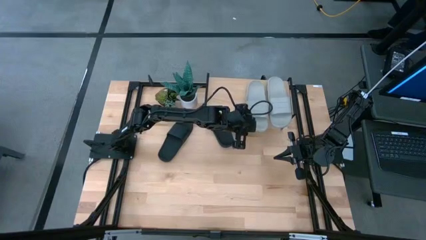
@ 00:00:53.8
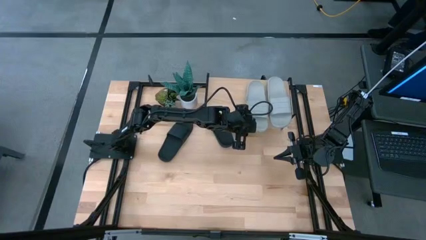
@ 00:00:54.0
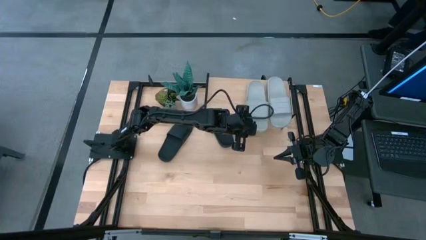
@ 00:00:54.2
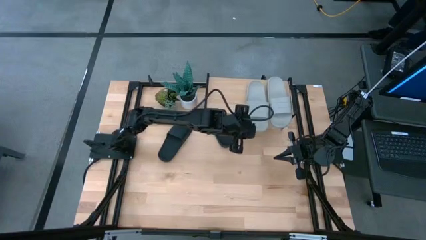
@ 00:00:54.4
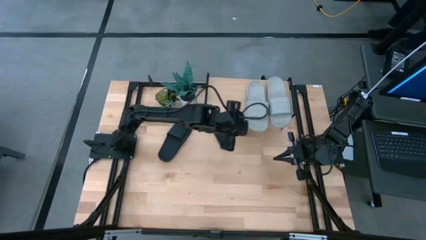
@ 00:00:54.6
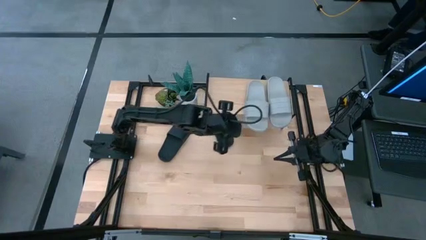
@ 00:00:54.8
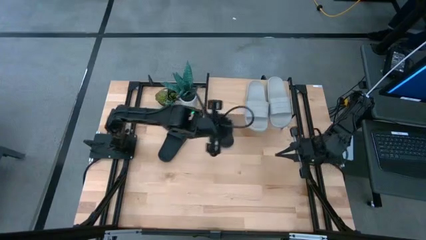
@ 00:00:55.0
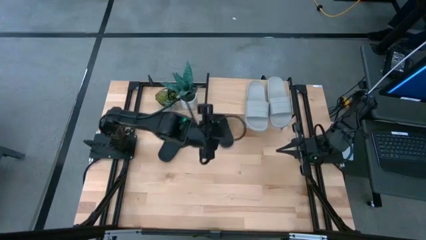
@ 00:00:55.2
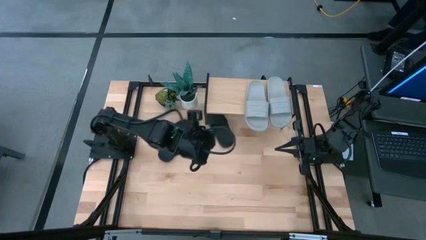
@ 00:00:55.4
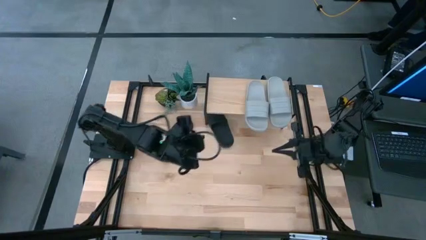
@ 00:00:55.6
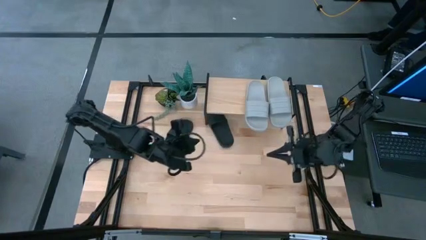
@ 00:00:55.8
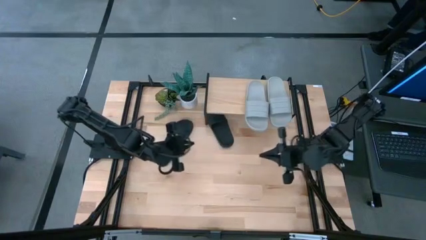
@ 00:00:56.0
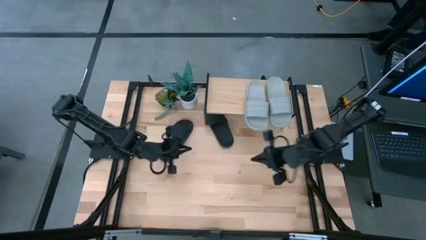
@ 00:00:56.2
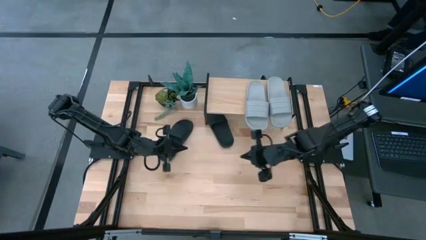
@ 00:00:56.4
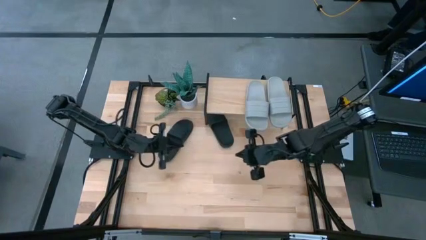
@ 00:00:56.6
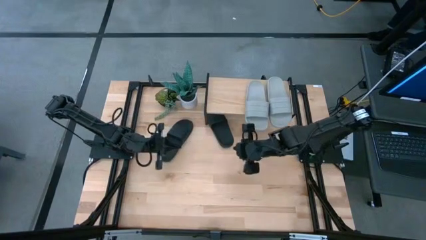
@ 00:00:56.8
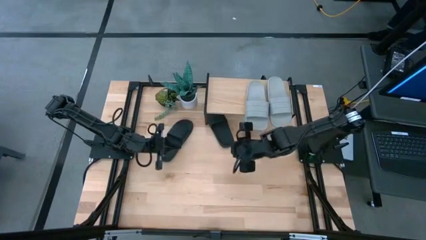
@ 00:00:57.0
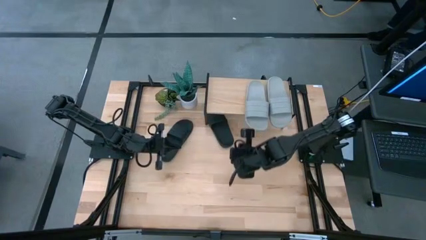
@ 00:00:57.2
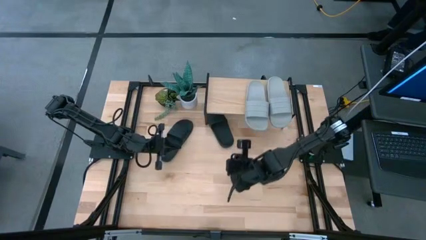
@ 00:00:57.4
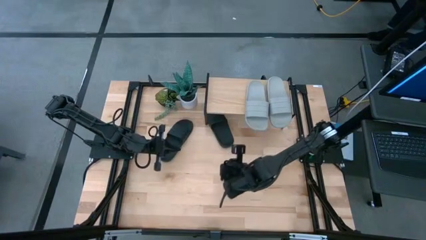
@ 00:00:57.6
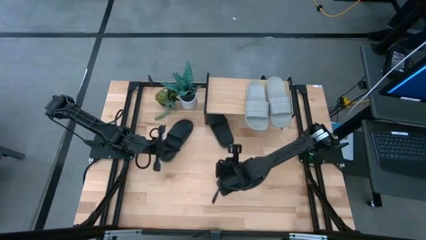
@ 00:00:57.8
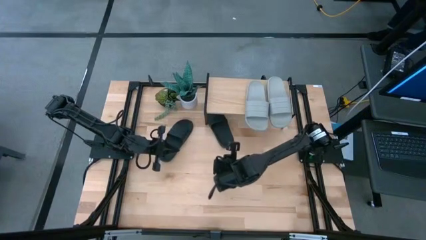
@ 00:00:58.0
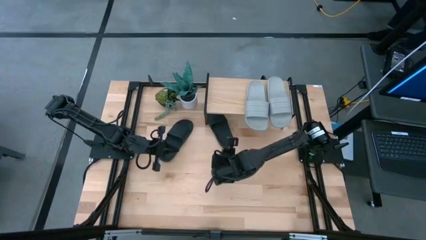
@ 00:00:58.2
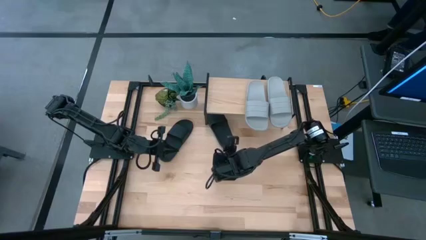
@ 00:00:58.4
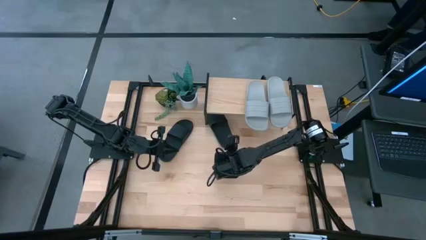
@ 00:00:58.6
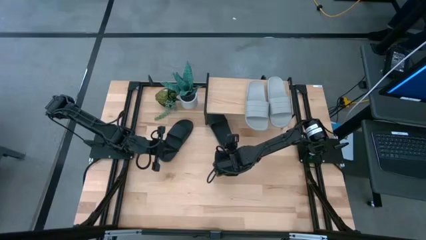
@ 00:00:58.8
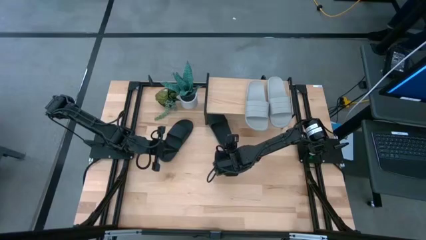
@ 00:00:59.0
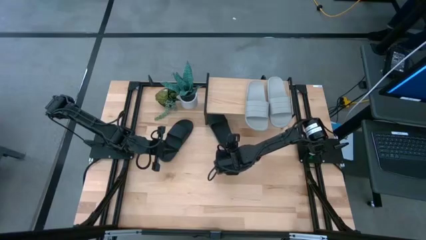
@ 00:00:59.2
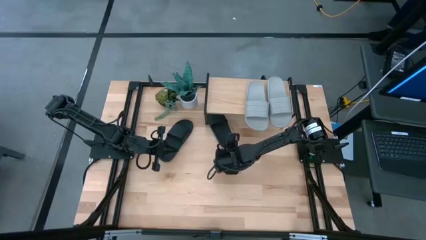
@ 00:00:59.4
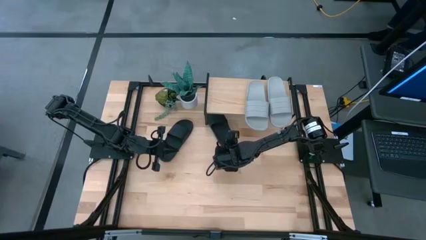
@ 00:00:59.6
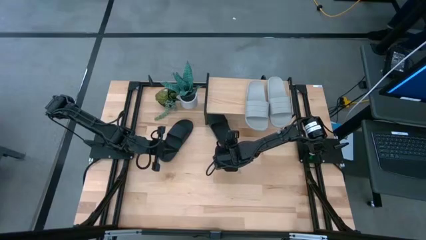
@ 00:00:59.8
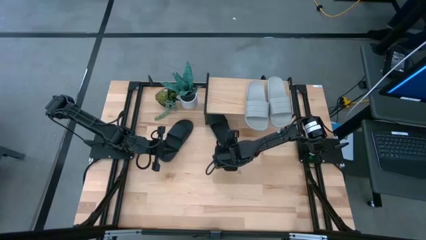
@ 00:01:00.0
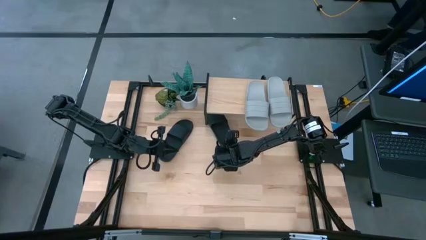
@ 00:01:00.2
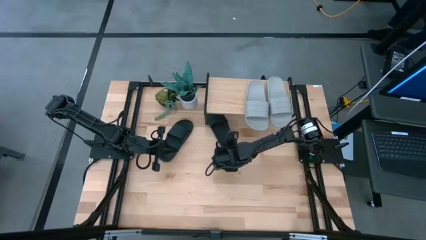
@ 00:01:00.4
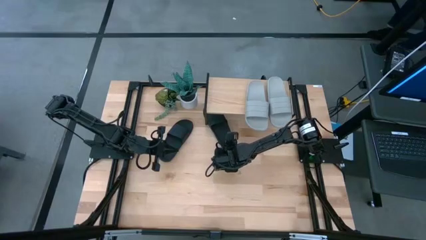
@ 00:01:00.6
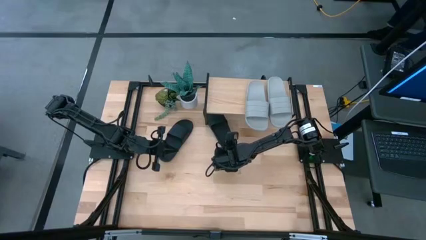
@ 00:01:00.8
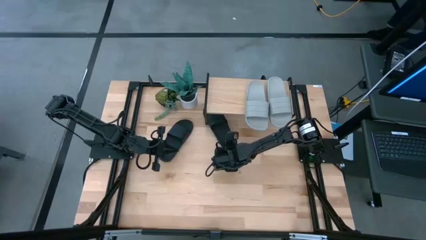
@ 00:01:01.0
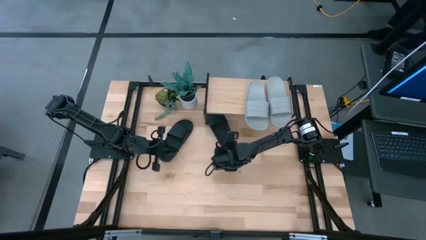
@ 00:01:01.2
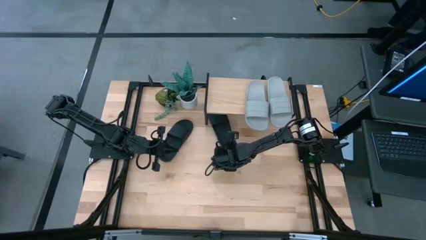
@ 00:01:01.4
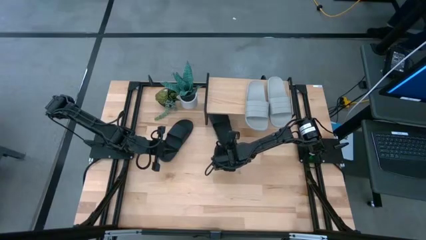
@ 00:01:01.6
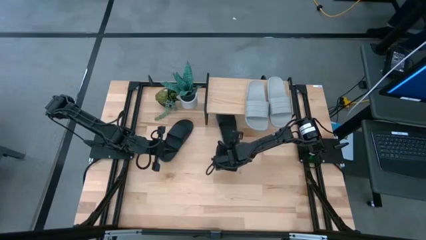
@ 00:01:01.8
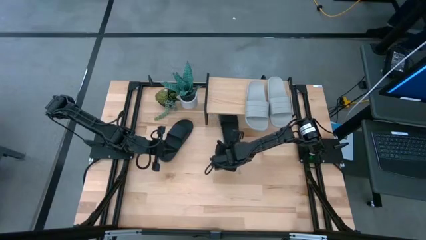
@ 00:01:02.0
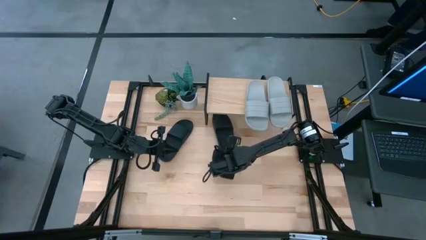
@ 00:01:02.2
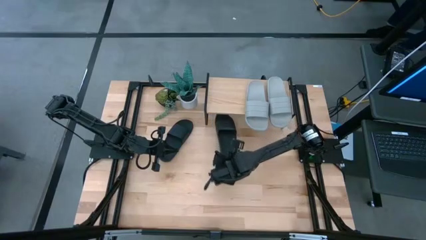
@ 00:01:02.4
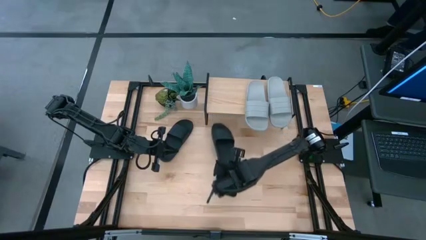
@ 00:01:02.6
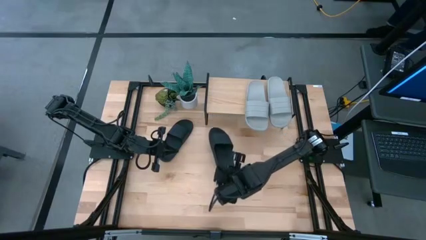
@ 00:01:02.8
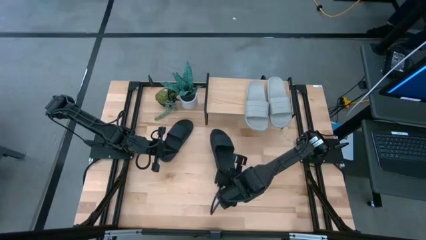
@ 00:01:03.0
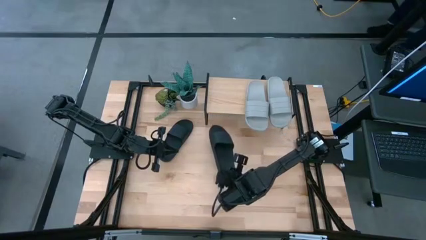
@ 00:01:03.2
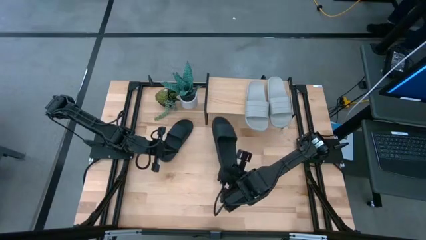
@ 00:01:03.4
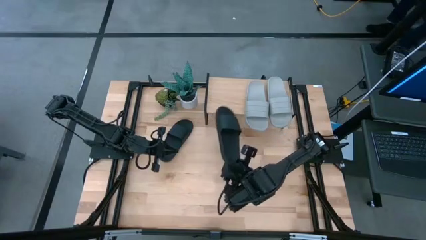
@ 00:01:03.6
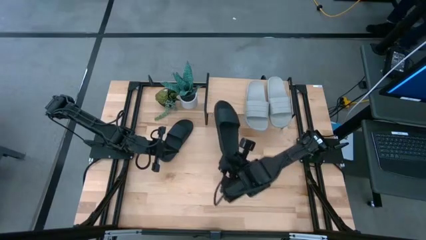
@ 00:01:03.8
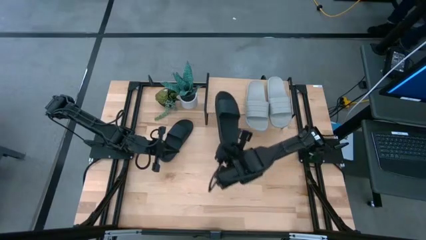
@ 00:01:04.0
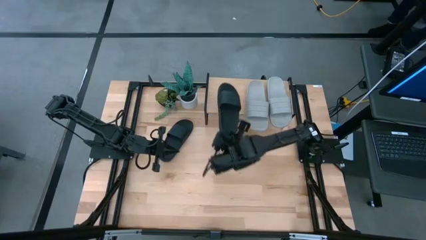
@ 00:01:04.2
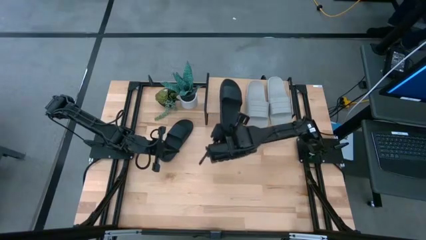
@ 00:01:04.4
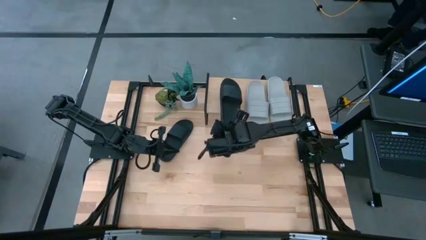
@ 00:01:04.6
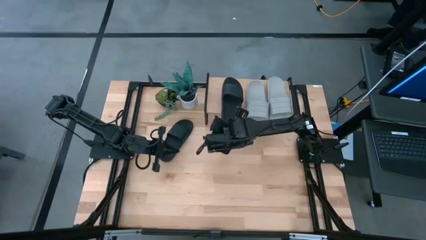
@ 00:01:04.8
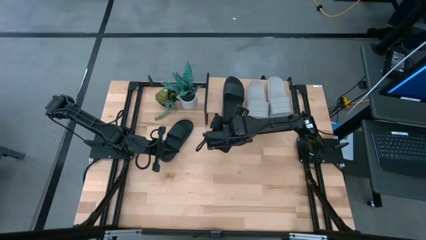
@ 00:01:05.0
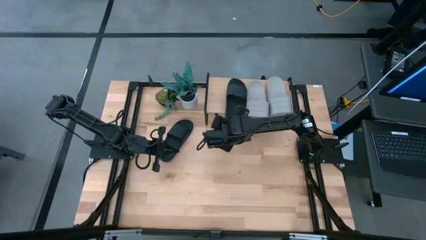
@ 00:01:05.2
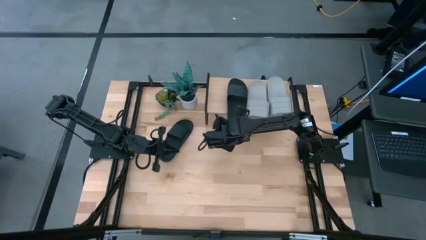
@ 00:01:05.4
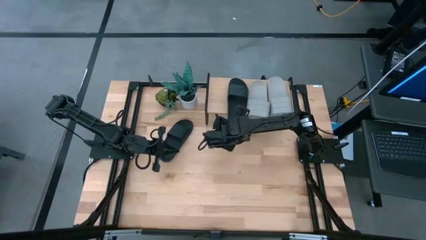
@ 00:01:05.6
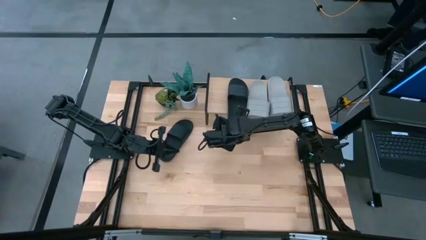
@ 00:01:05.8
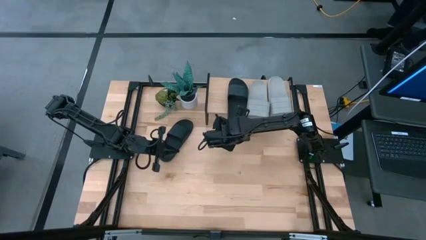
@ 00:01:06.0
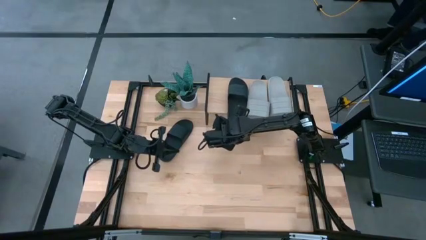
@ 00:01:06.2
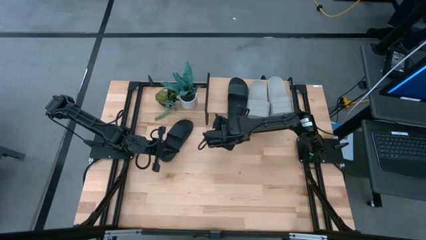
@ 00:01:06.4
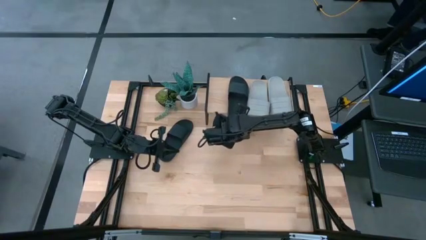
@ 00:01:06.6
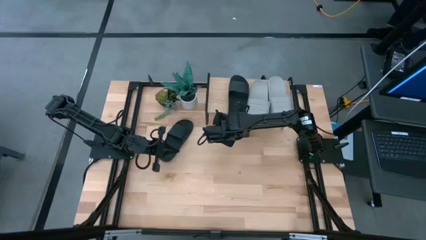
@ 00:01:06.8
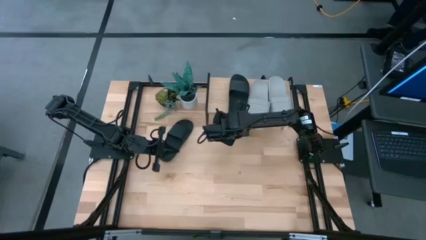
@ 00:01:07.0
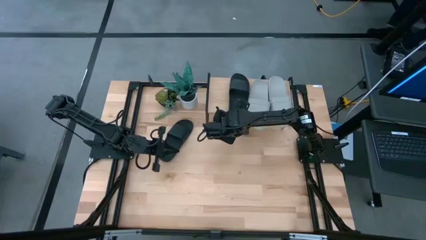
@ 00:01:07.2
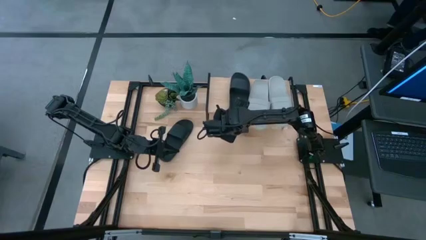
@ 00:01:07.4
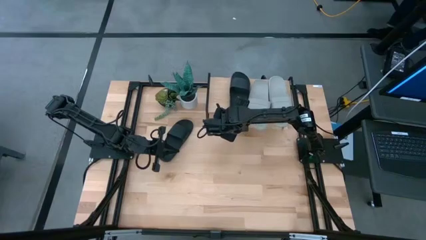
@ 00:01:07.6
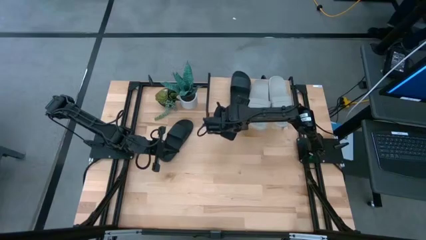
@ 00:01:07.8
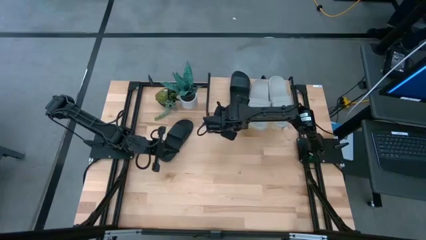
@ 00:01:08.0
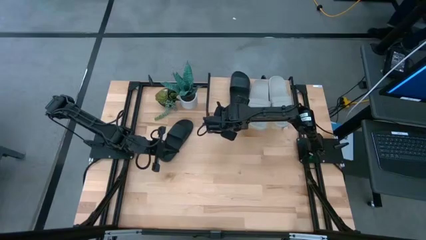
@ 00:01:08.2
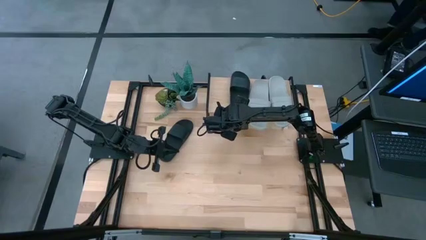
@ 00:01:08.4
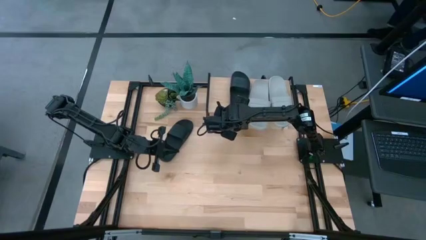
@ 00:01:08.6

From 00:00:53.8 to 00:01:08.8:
Task: Pick and place slides into the shelf
Put the right black slipper on the shelf
